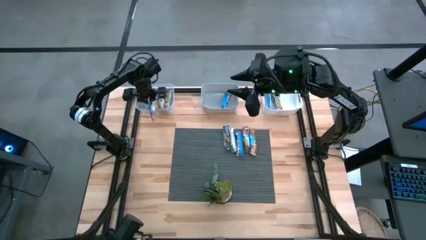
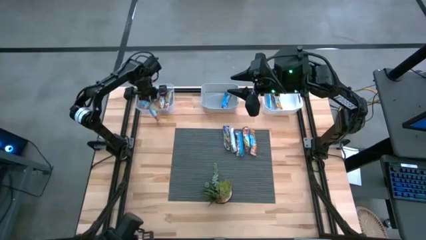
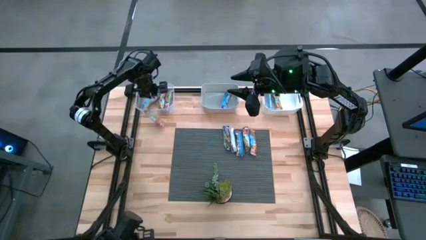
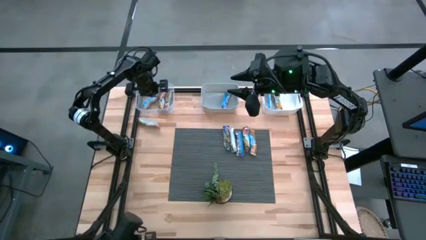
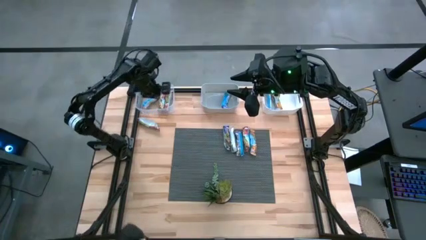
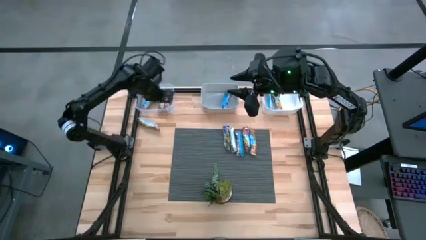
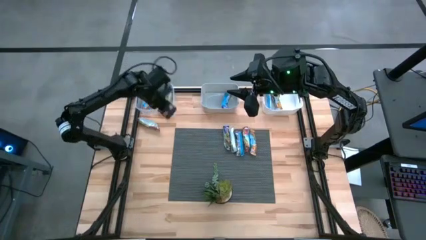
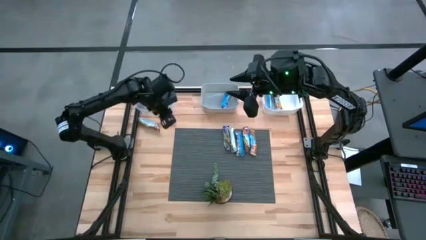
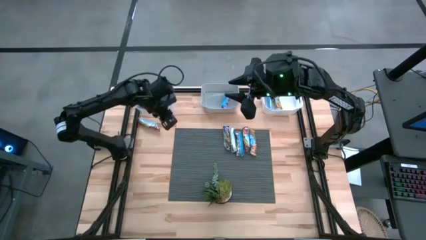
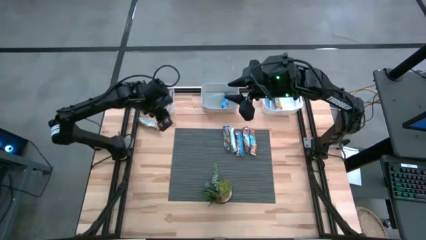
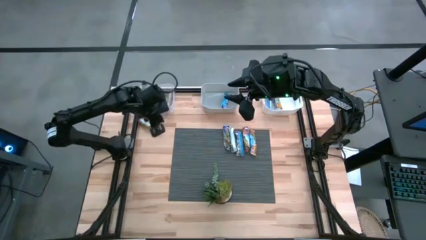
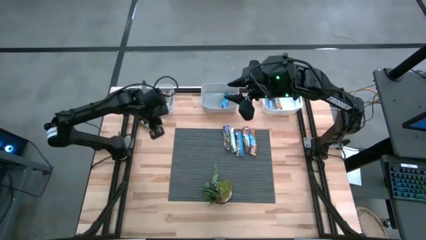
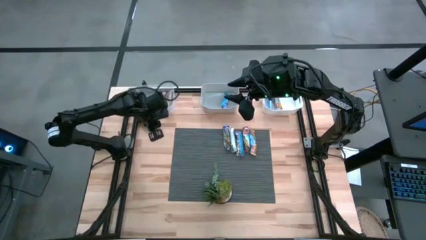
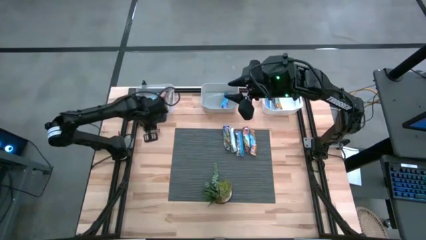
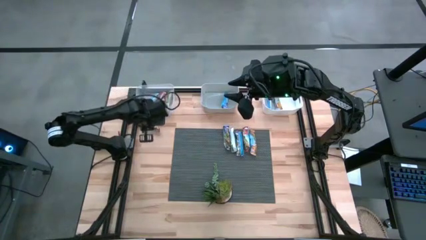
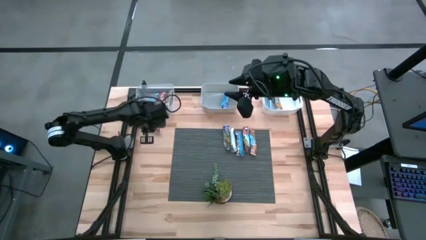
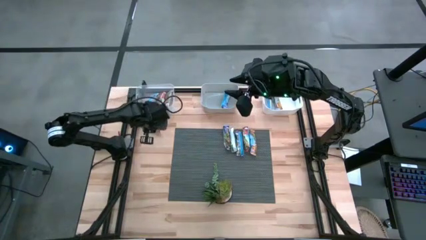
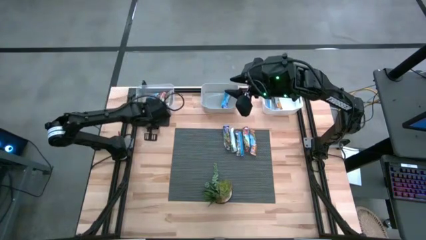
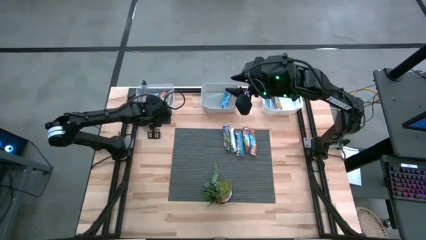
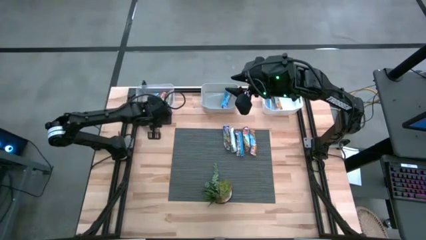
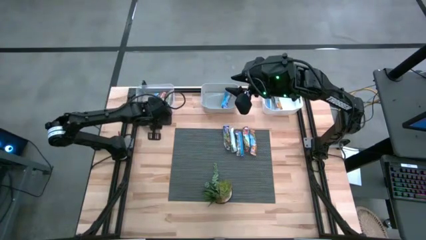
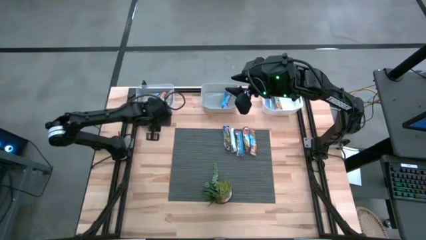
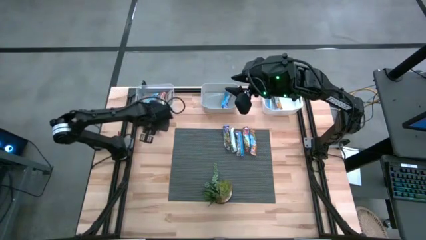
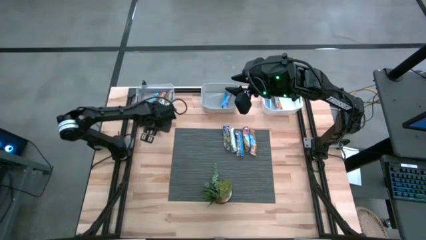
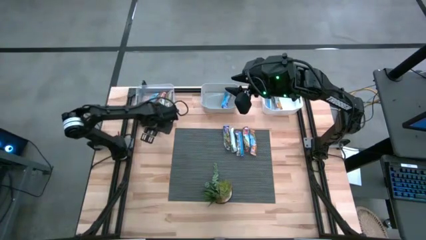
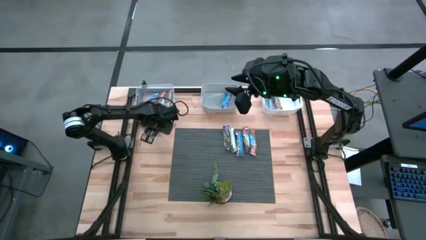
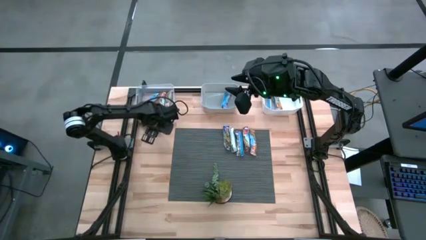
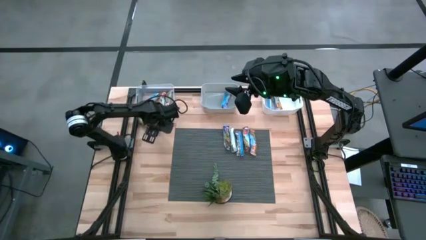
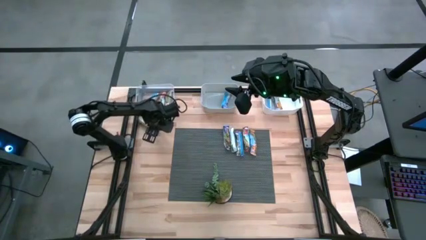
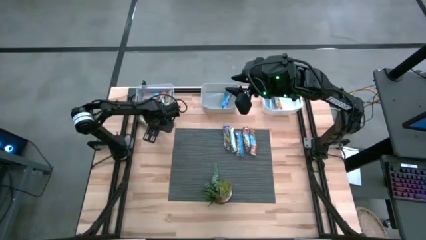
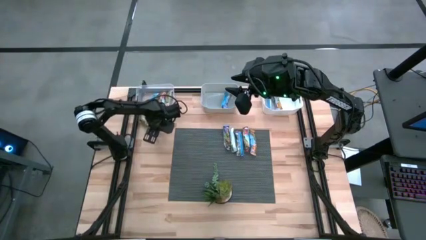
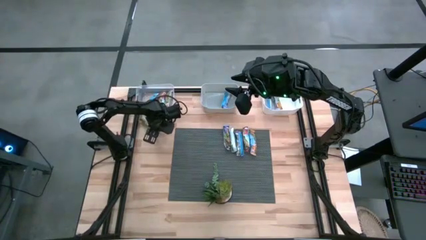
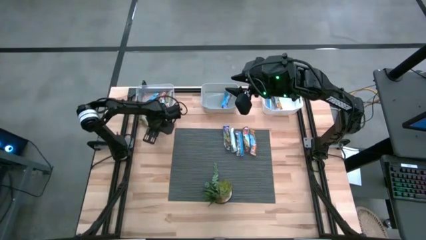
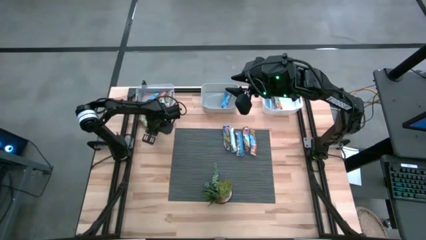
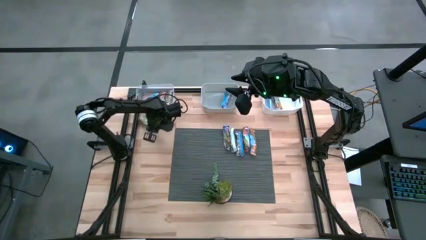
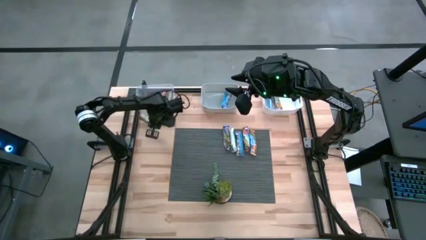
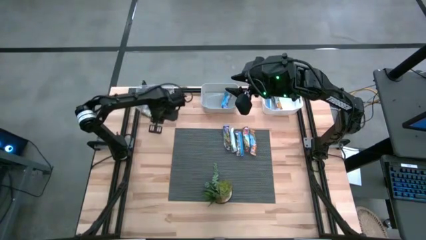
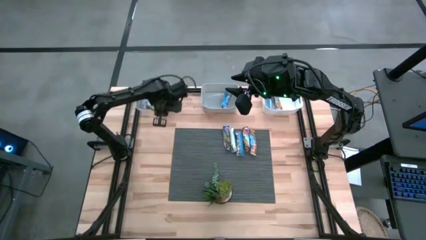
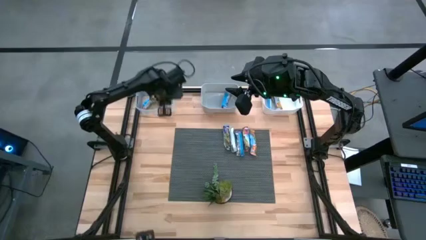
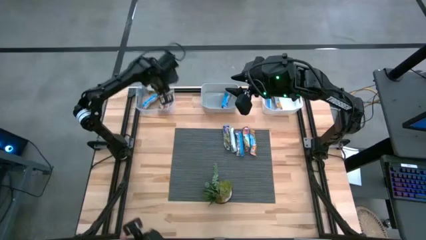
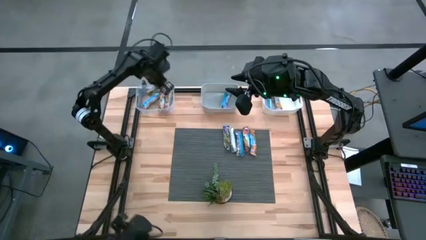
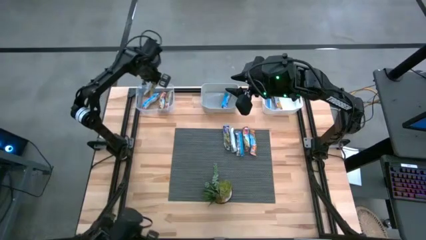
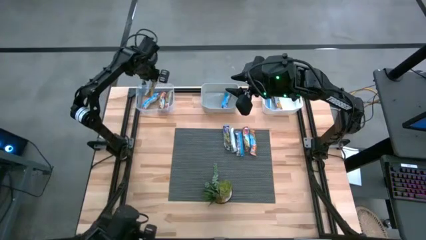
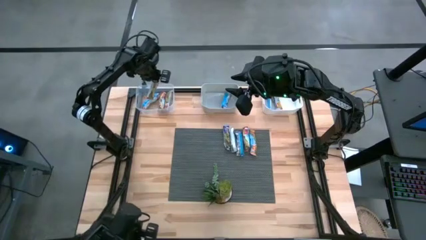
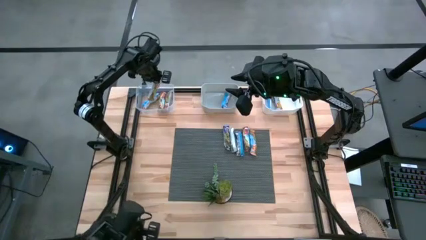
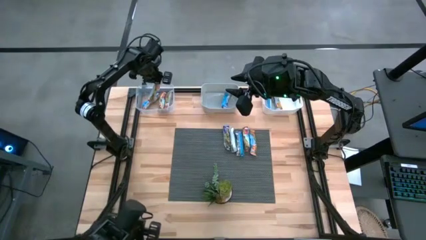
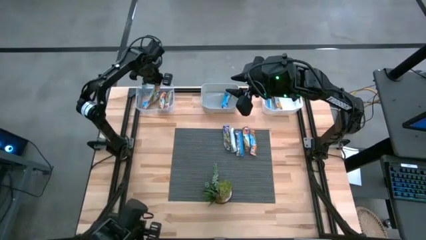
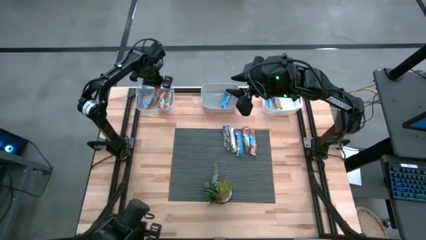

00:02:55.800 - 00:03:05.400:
Task: Pick and place Granola Bars by type
Put the red granola bar into the transparent bin

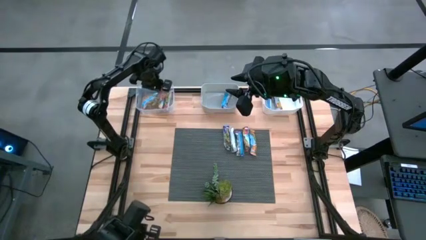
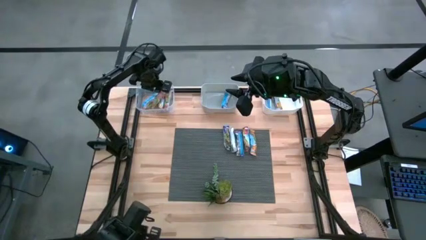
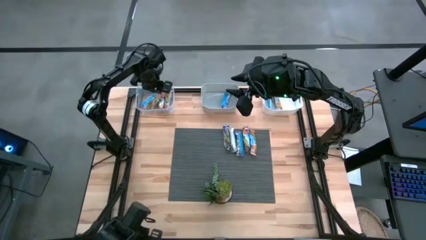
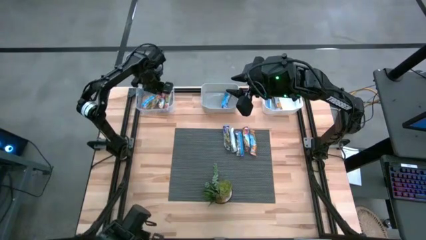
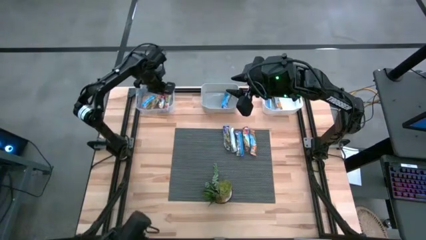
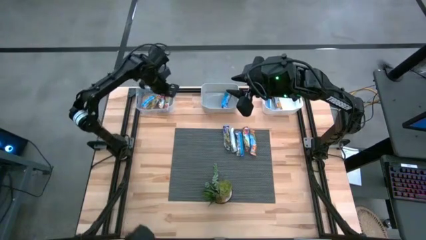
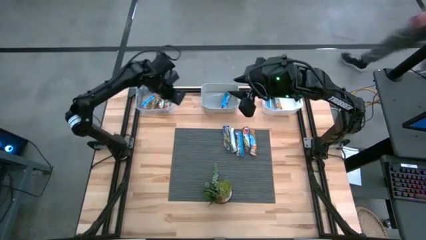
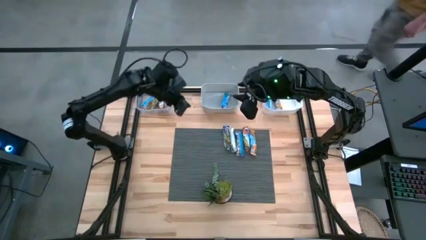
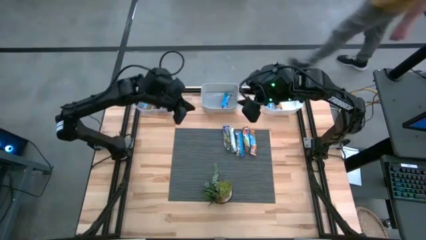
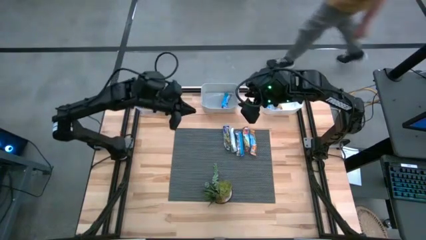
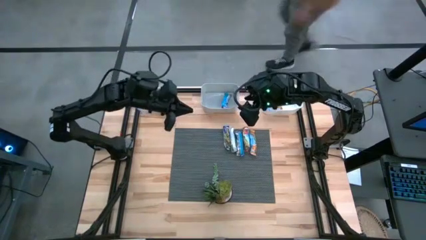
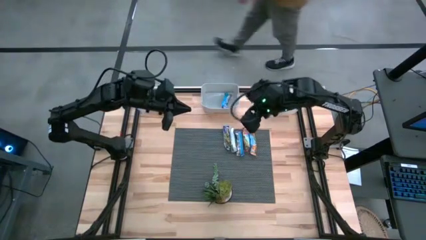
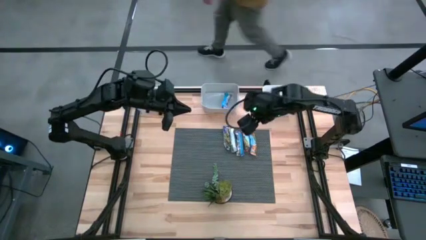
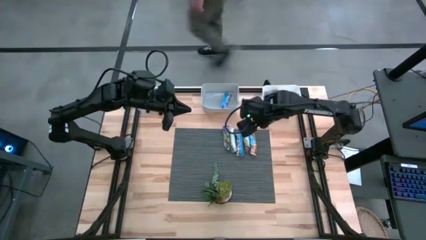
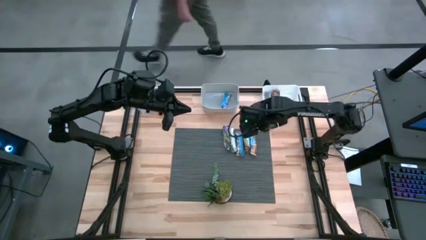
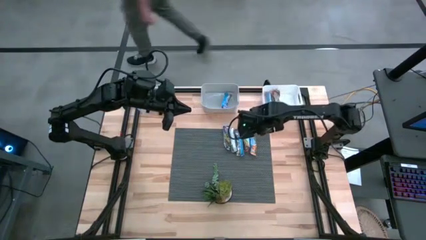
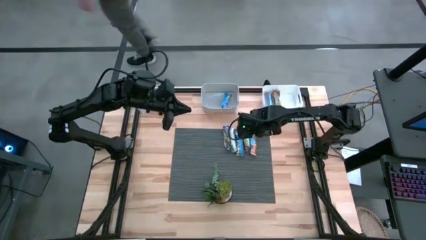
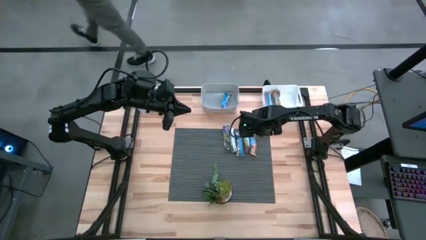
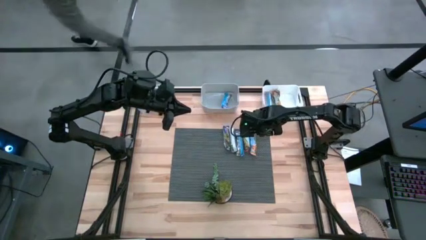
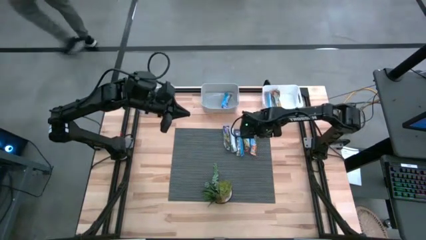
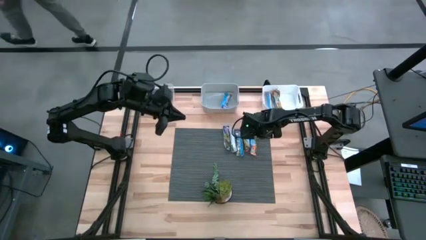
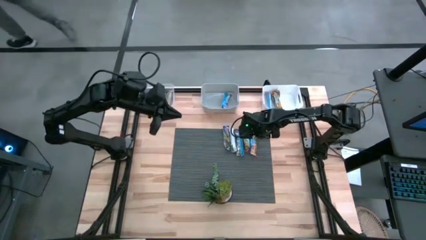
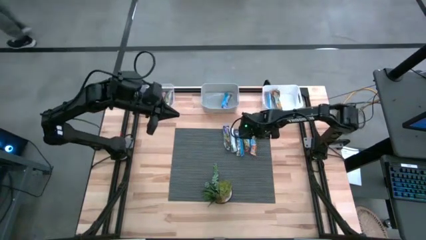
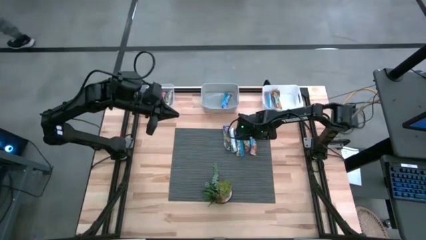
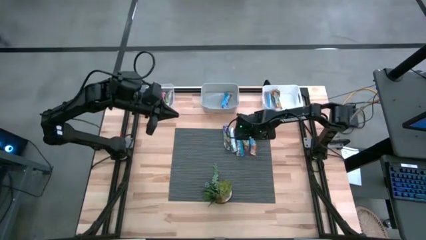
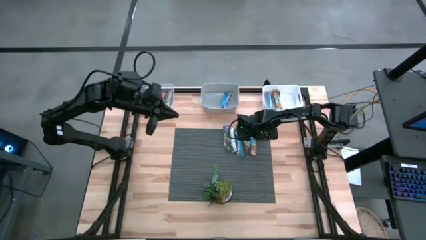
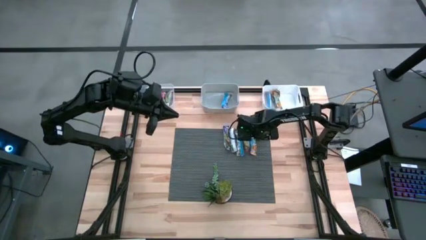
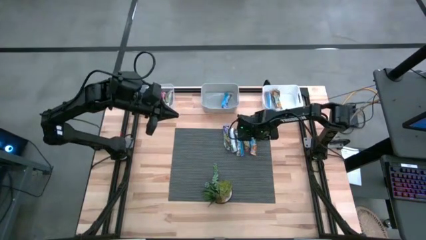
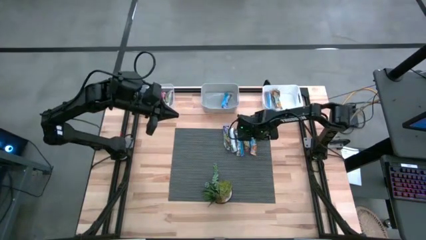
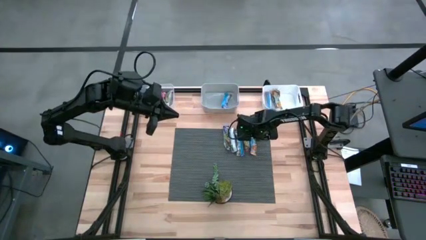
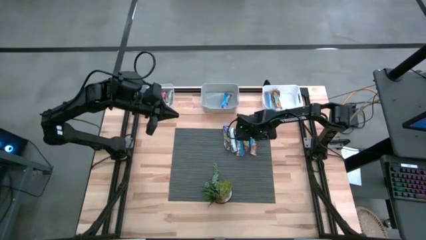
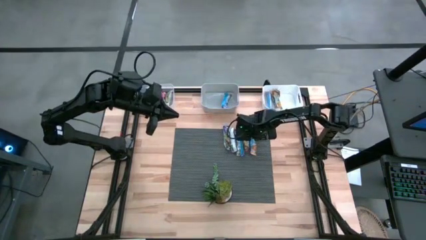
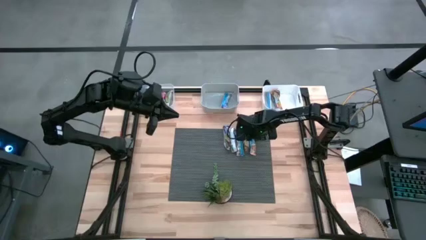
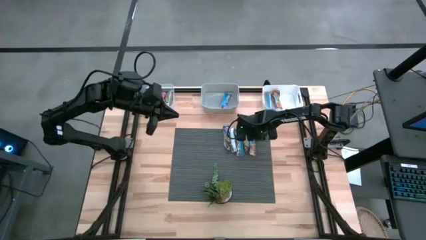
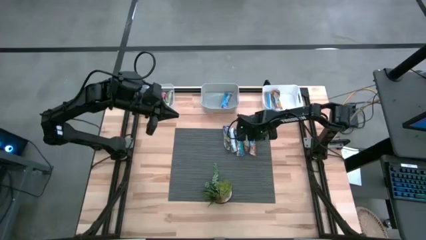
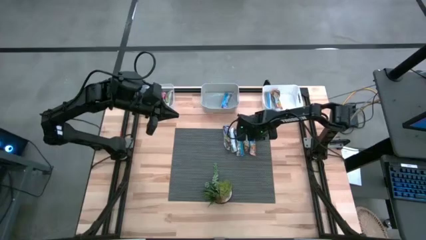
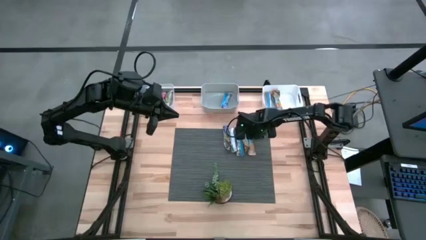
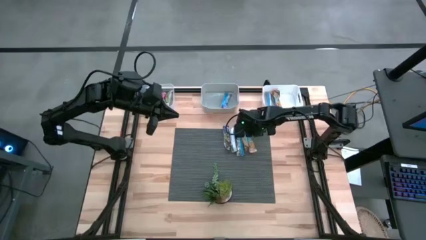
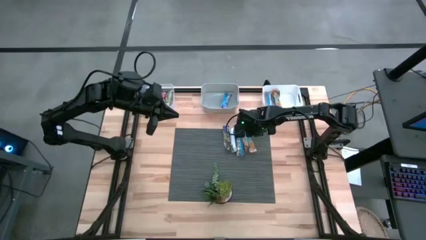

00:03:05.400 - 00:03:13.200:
Put the yellow granola bar into the white bin
